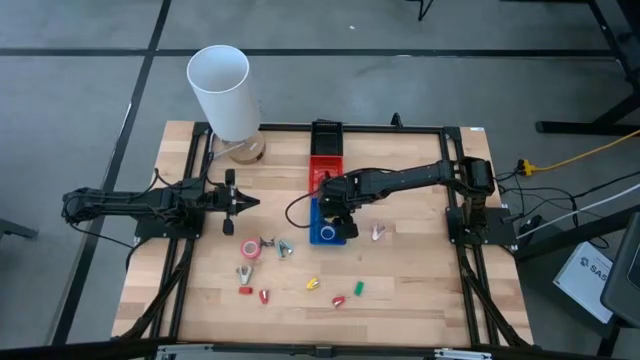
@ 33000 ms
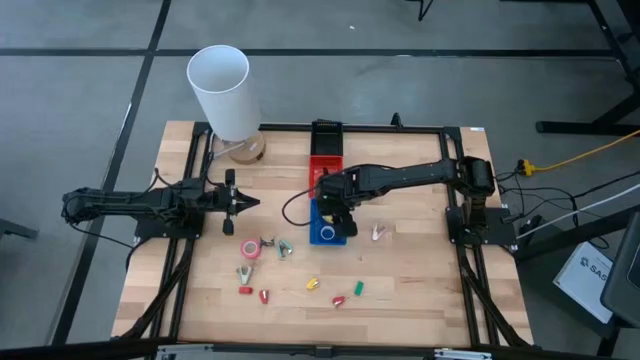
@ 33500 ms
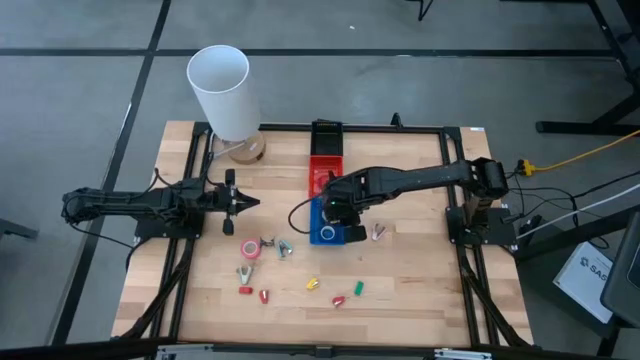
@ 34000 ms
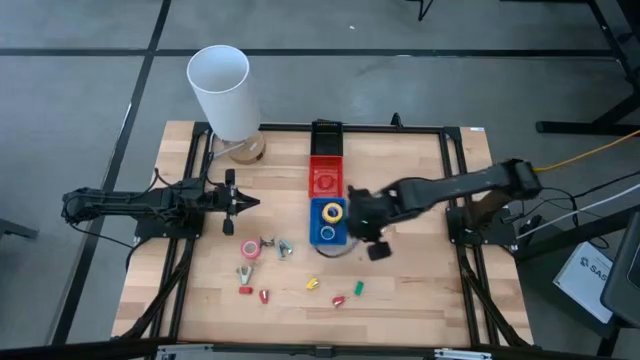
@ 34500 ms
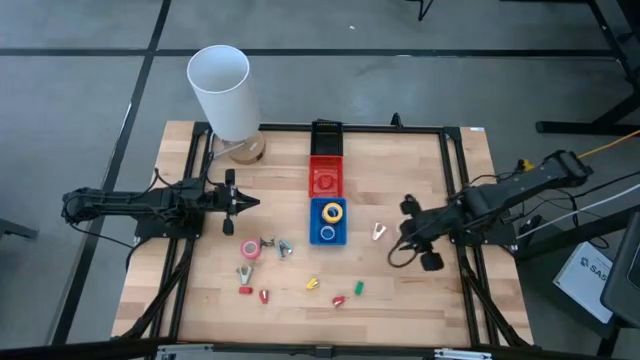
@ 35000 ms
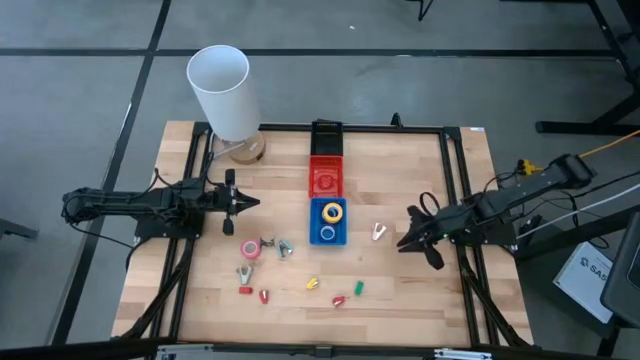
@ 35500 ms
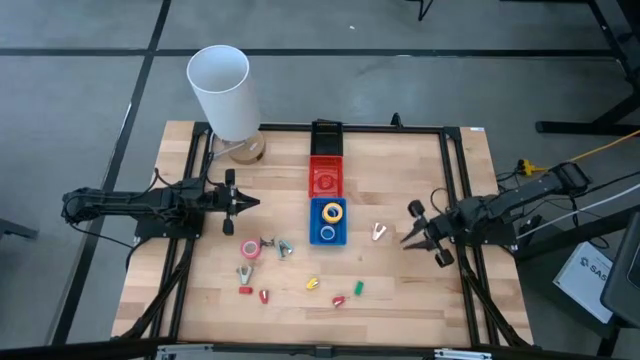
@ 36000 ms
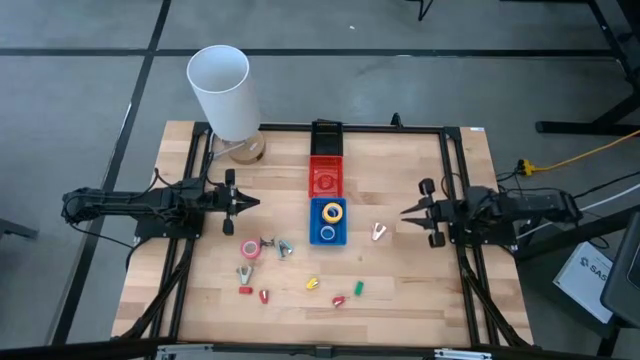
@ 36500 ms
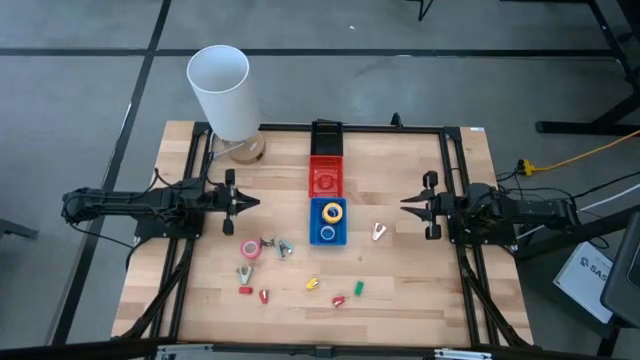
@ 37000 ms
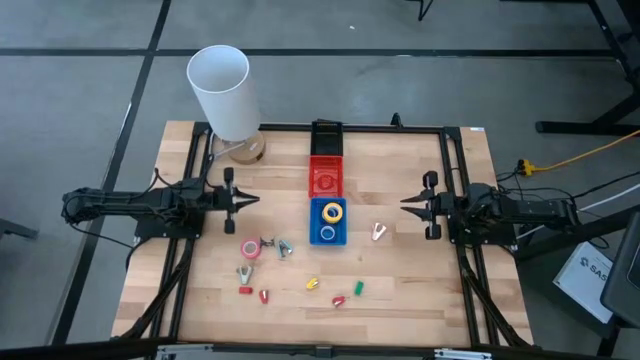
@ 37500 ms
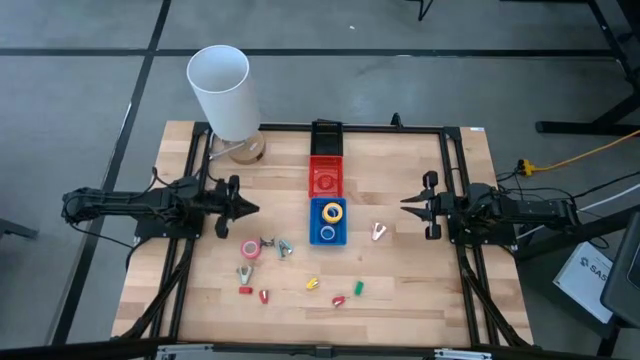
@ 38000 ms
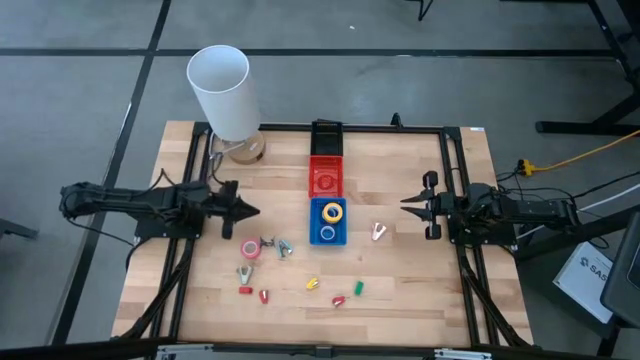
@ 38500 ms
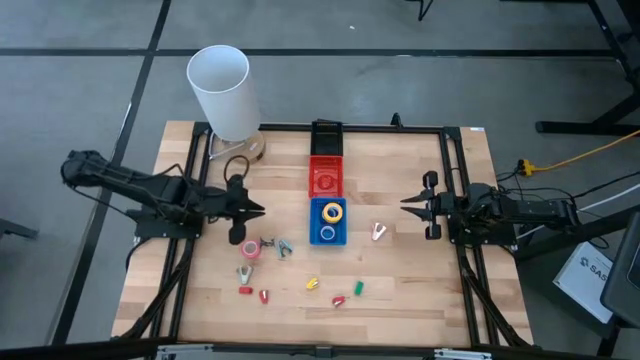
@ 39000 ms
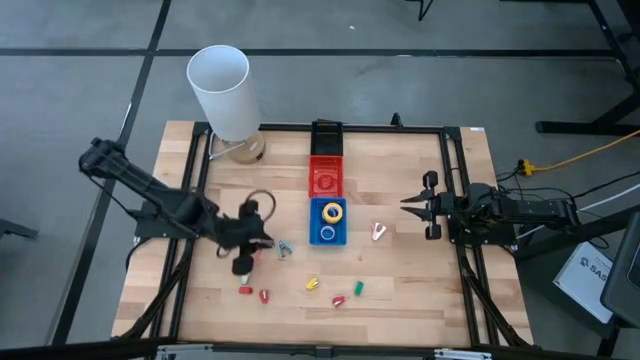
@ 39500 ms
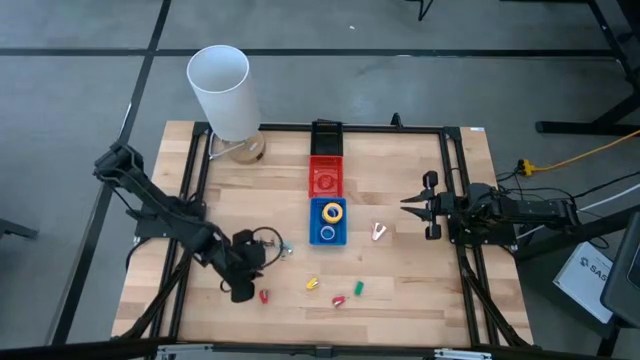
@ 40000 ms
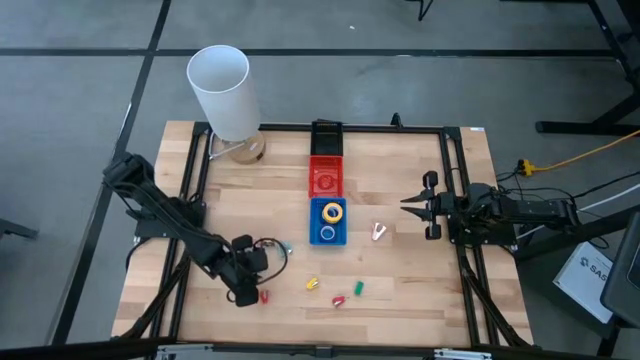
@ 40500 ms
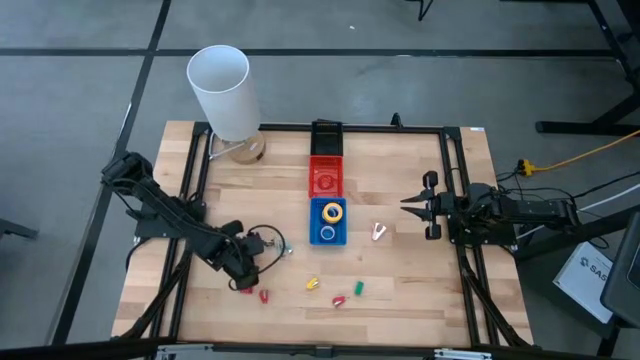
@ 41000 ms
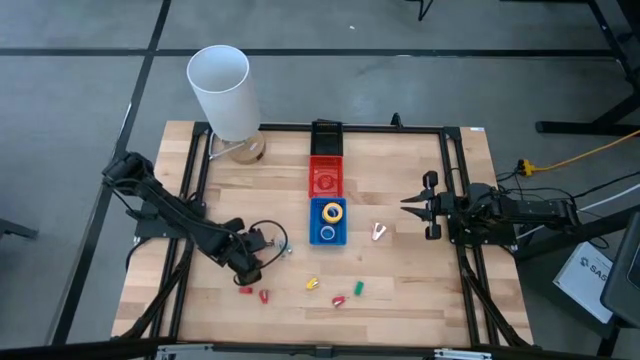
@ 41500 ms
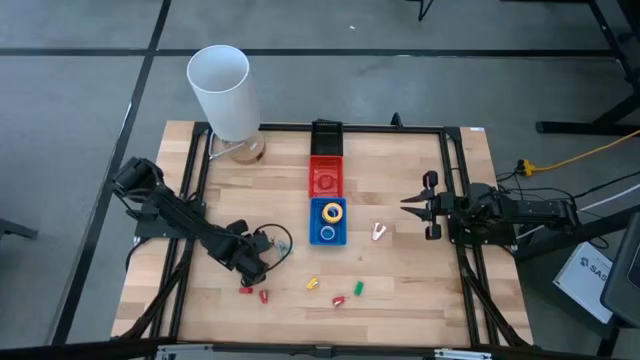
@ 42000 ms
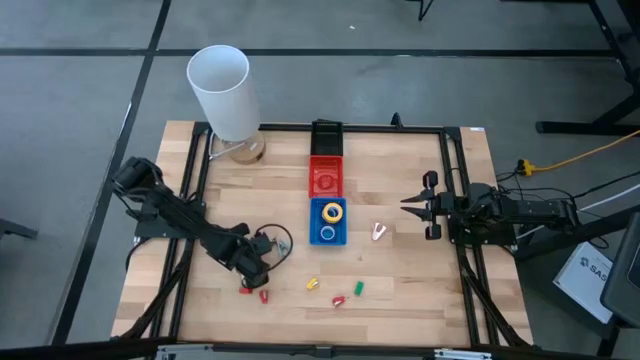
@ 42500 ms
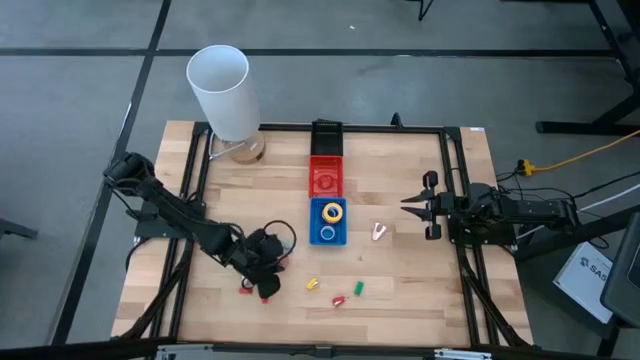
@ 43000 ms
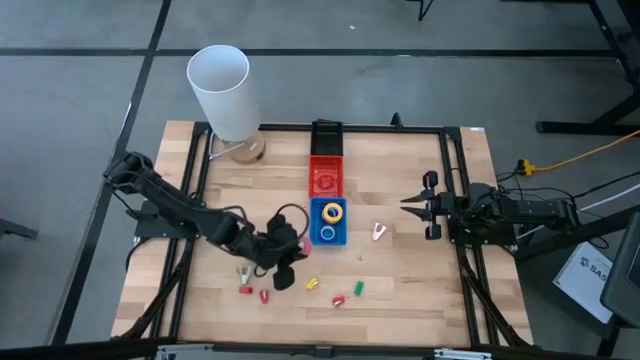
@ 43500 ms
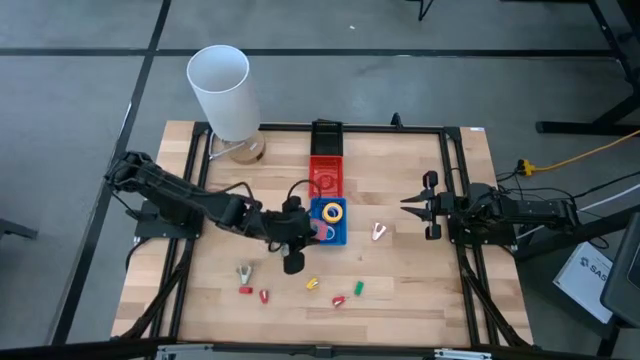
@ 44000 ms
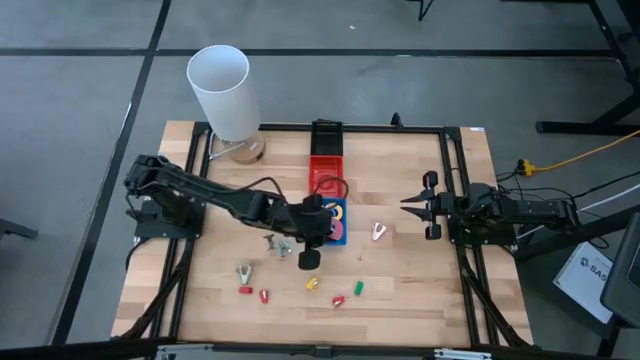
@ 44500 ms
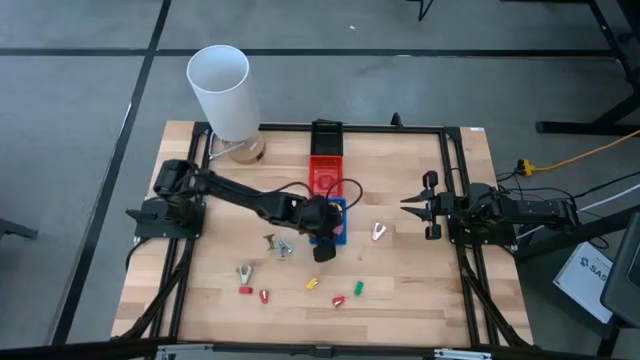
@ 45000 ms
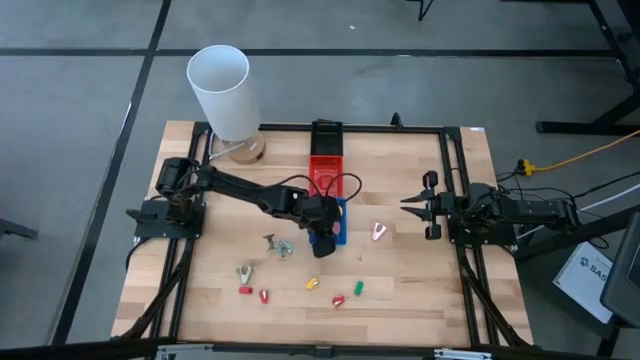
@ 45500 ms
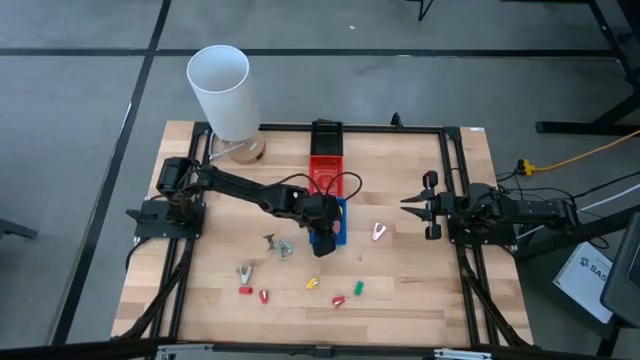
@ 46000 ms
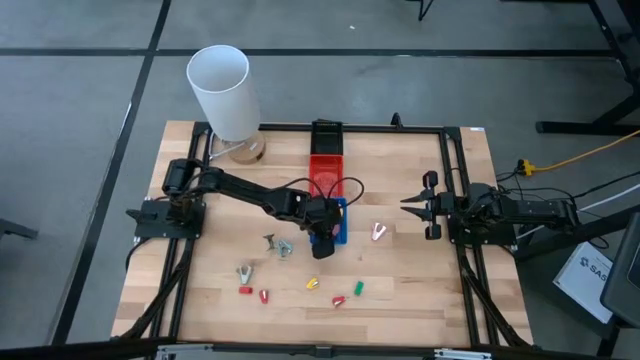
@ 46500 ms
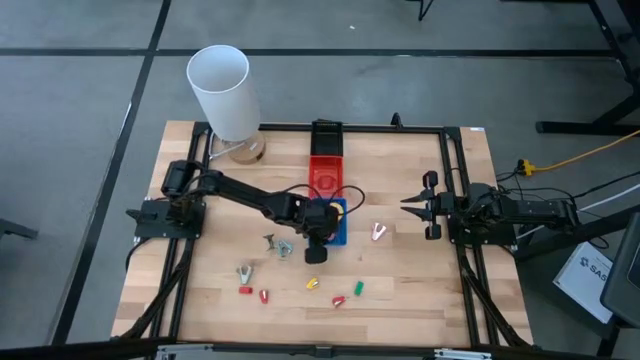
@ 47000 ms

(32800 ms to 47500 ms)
Task: Pick and place Stapler, Stapler remover, tape
Put the pink tape into the blue bin

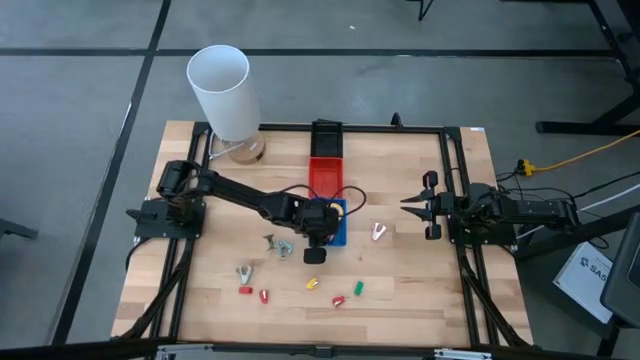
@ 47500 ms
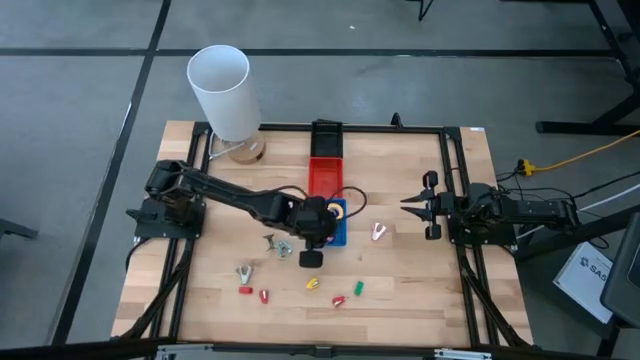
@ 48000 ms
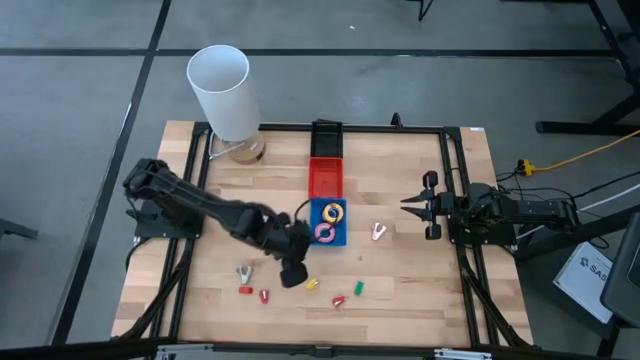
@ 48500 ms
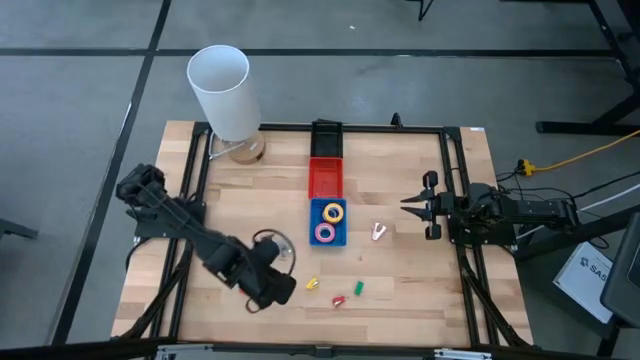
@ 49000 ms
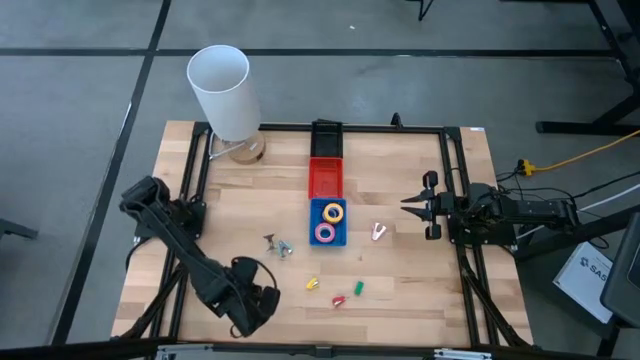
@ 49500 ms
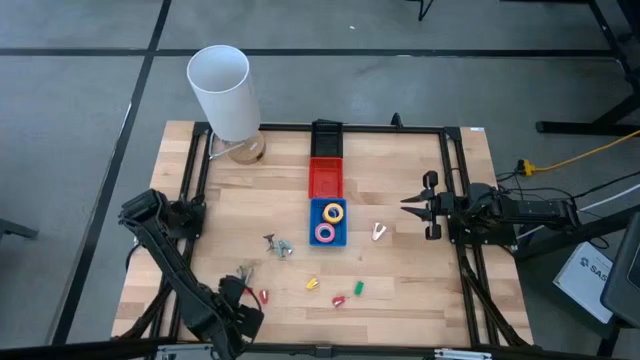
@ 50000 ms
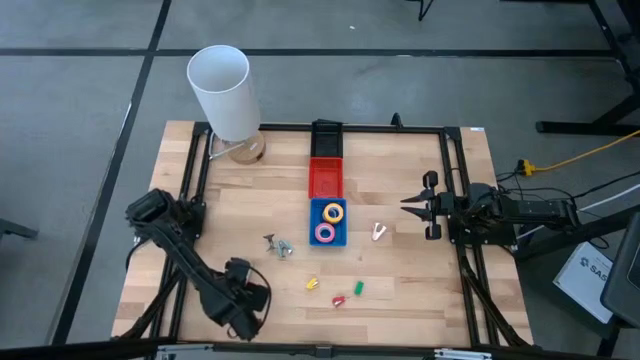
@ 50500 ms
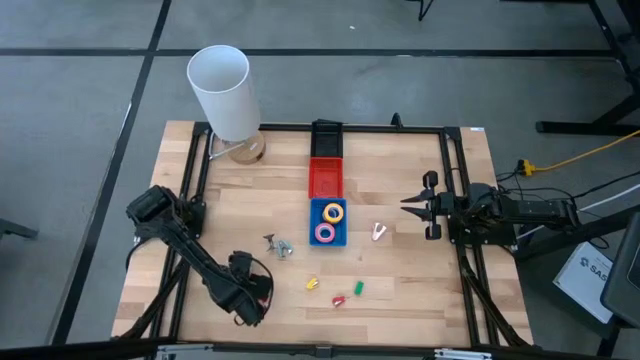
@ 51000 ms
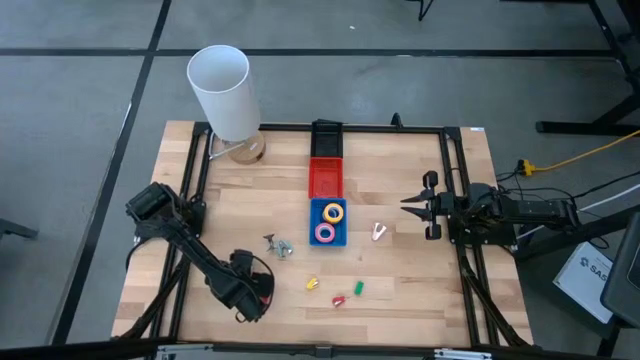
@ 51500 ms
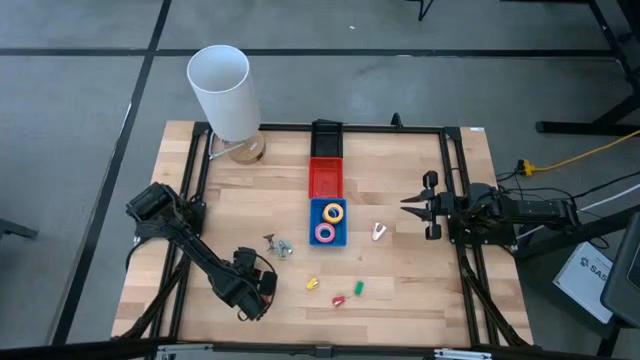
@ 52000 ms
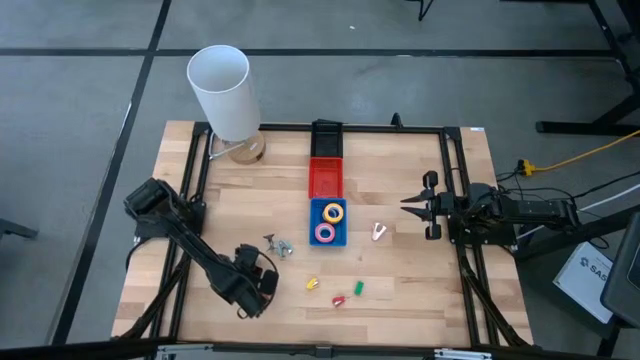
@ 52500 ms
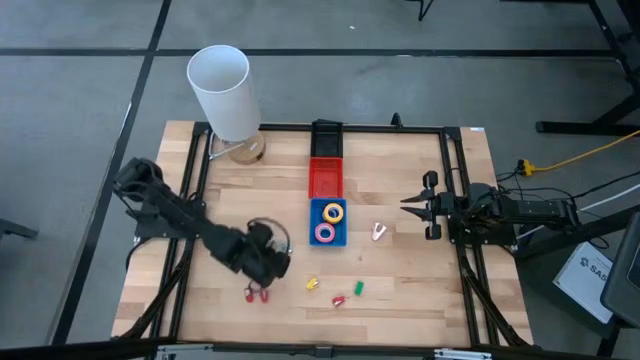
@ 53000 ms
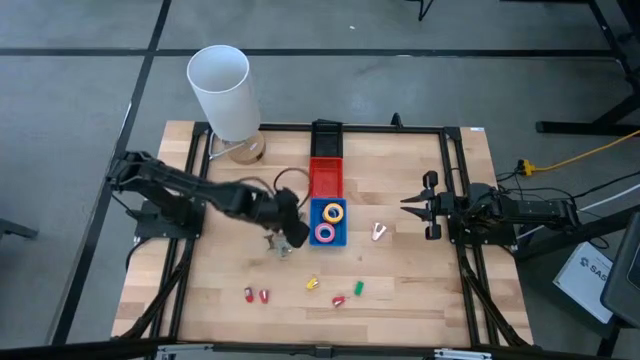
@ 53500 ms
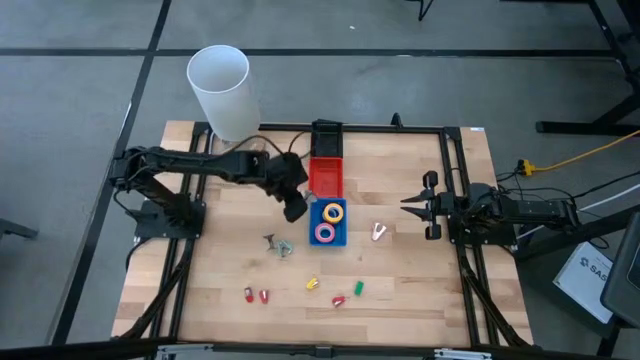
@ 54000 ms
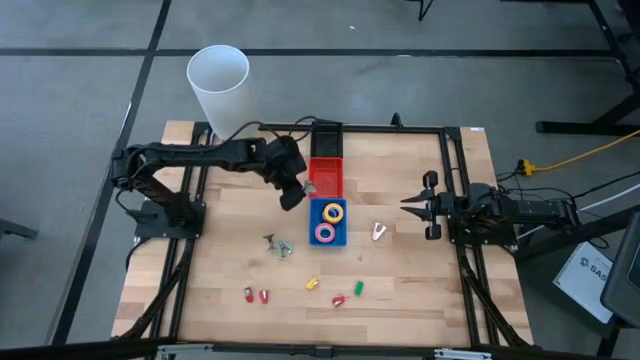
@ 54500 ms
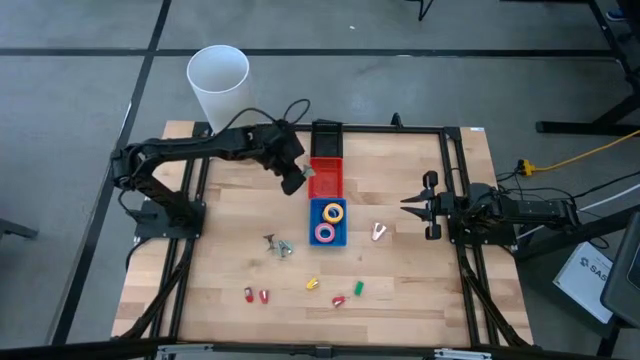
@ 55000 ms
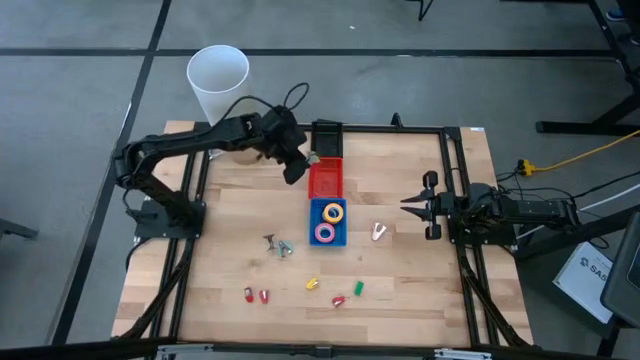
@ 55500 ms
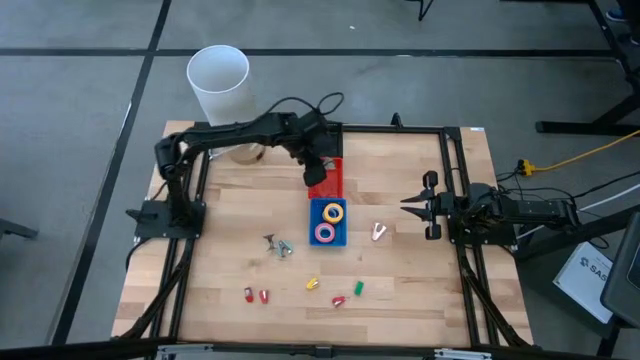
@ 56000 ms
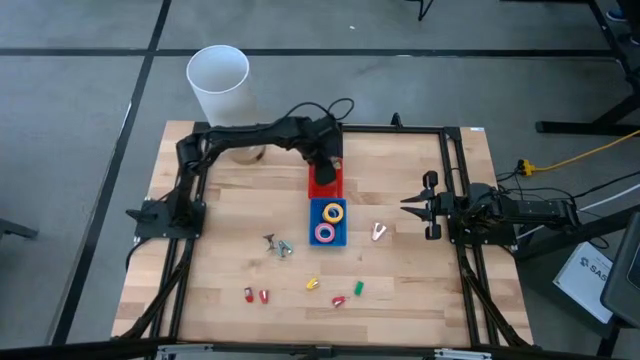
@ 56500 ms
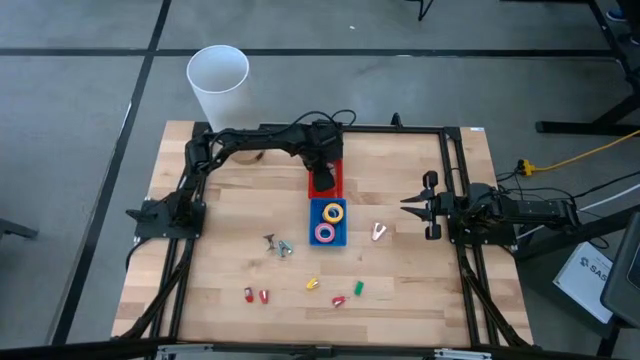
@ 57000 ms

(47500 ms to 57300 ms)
Put the gray staple remover into the red bin
